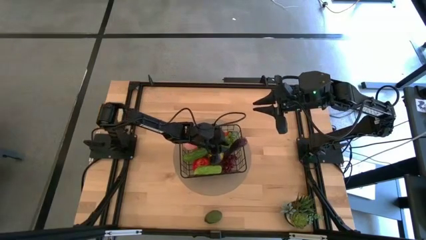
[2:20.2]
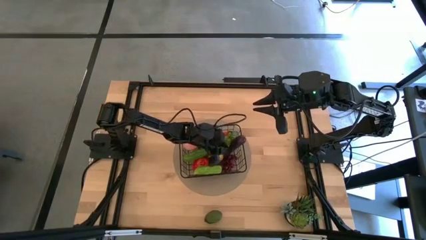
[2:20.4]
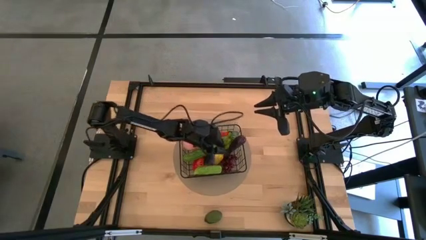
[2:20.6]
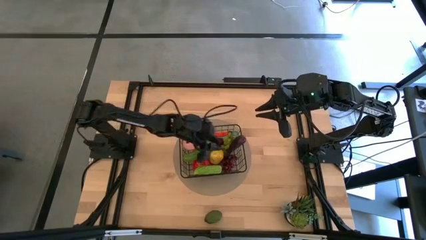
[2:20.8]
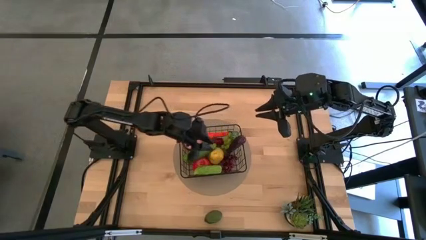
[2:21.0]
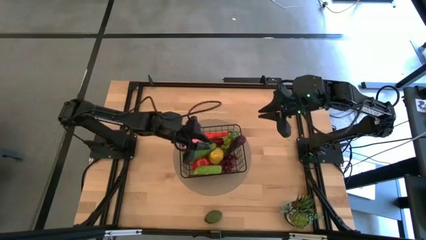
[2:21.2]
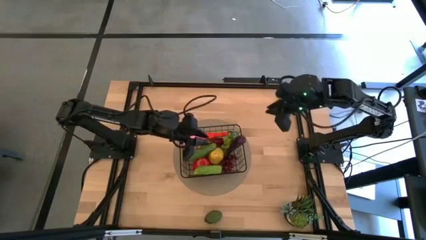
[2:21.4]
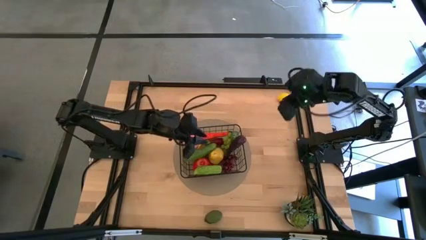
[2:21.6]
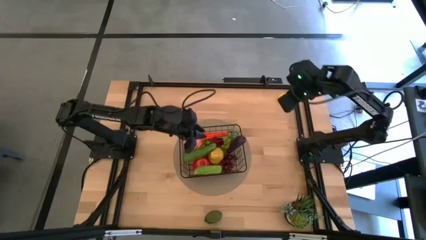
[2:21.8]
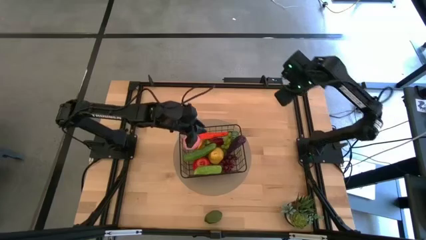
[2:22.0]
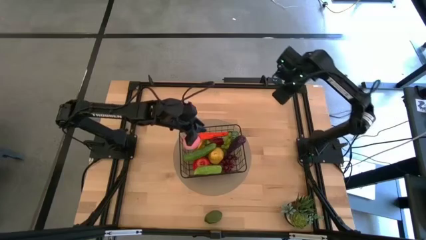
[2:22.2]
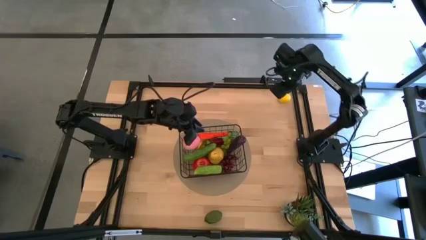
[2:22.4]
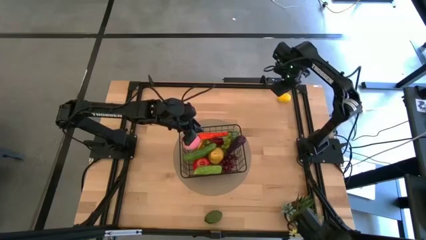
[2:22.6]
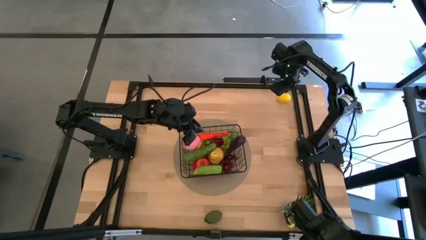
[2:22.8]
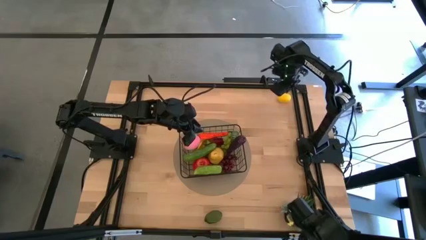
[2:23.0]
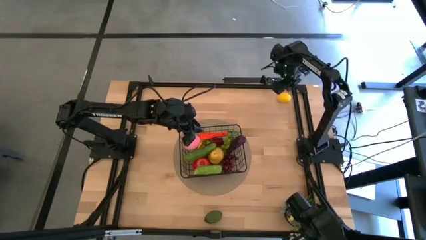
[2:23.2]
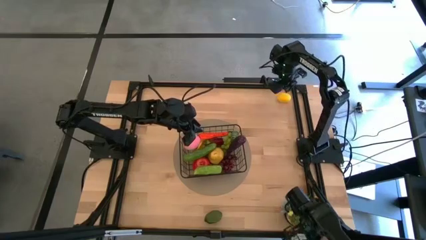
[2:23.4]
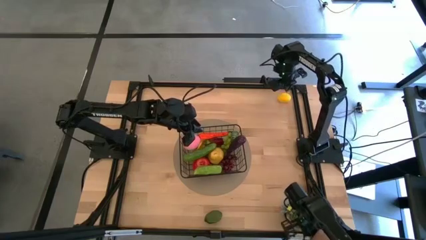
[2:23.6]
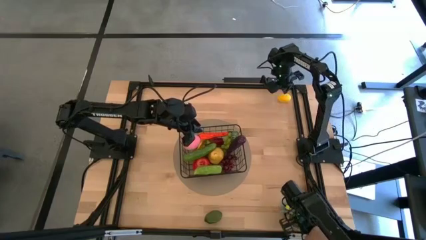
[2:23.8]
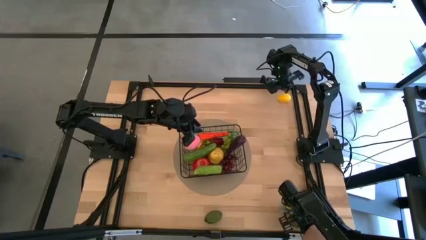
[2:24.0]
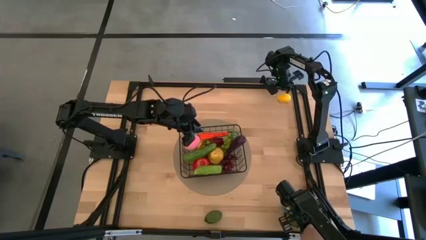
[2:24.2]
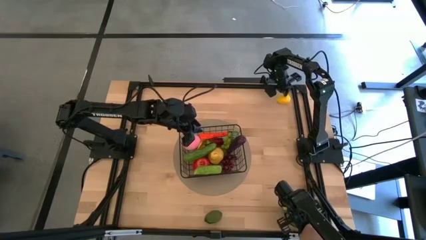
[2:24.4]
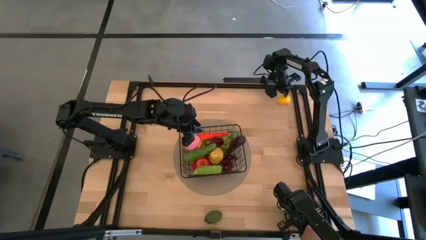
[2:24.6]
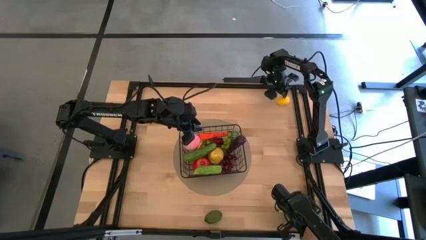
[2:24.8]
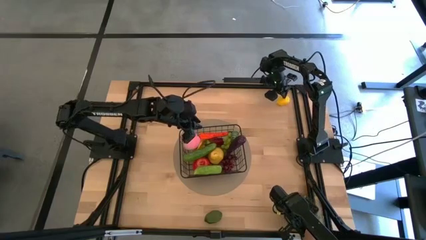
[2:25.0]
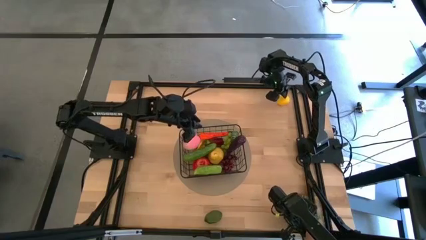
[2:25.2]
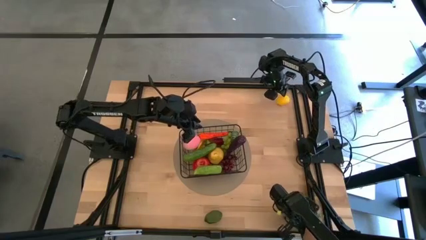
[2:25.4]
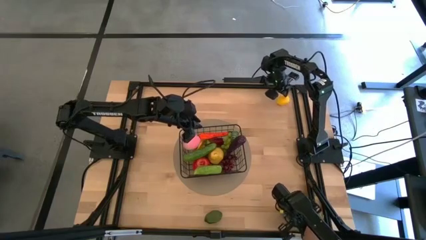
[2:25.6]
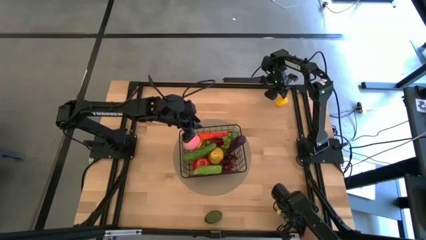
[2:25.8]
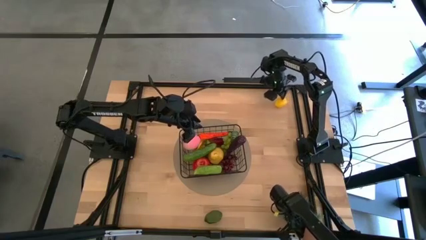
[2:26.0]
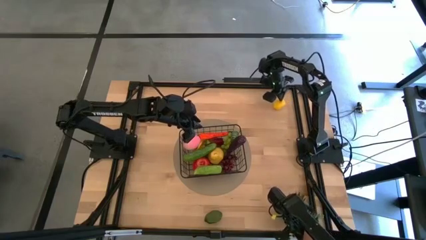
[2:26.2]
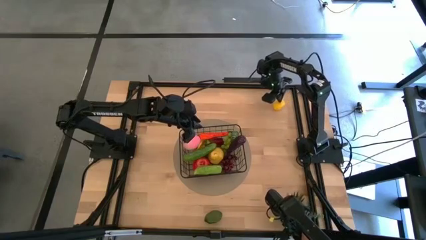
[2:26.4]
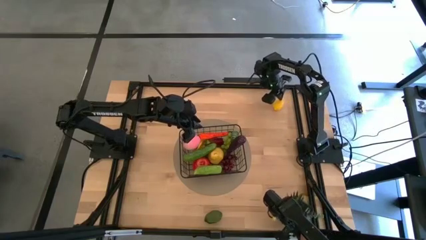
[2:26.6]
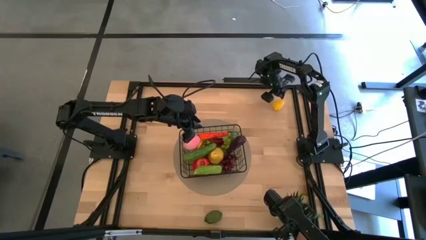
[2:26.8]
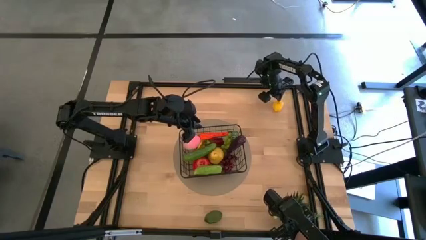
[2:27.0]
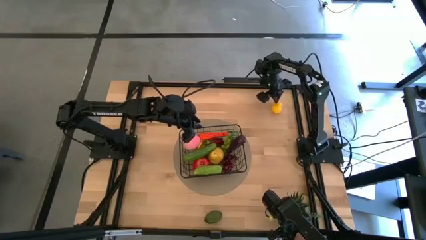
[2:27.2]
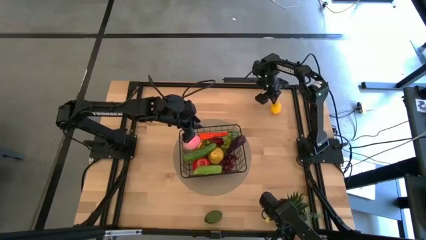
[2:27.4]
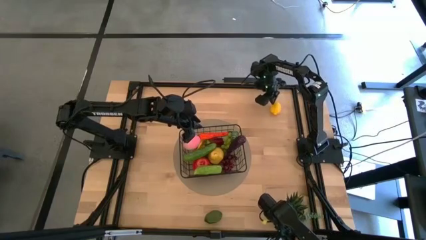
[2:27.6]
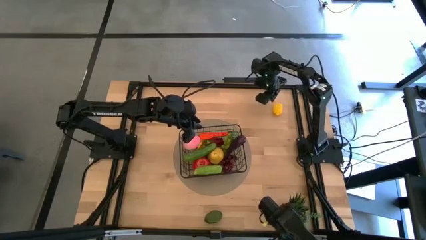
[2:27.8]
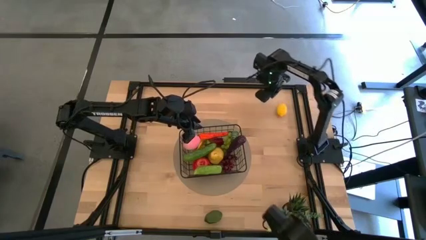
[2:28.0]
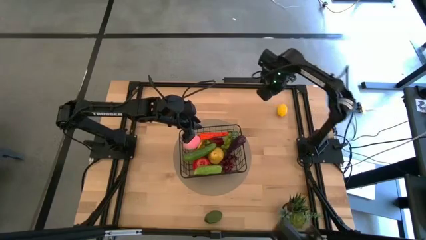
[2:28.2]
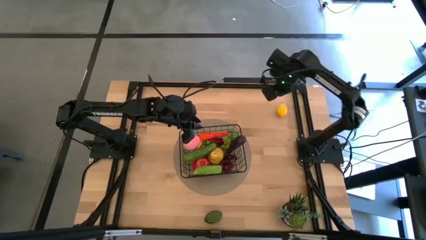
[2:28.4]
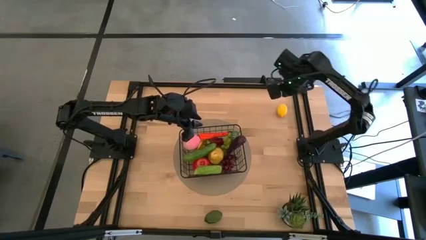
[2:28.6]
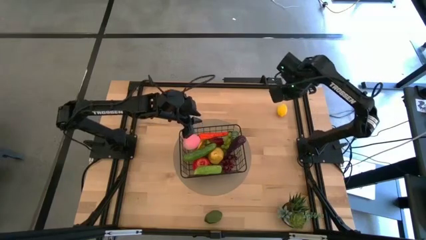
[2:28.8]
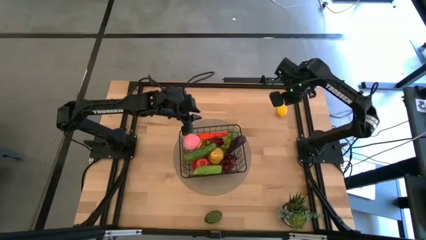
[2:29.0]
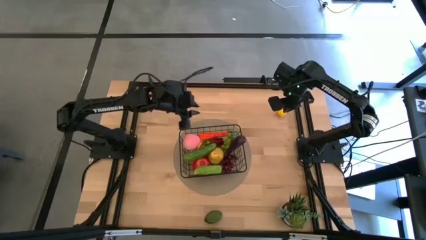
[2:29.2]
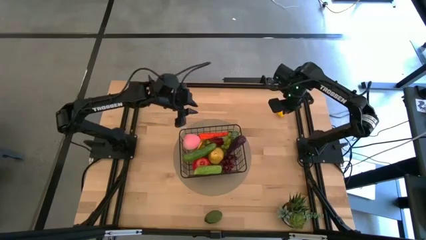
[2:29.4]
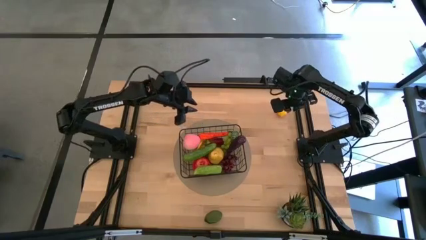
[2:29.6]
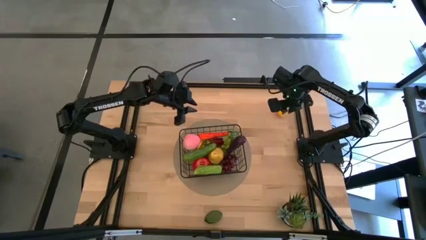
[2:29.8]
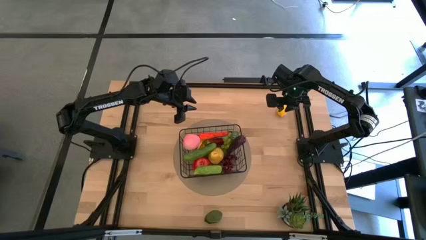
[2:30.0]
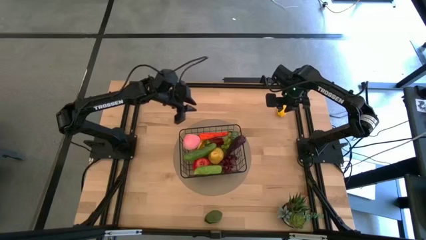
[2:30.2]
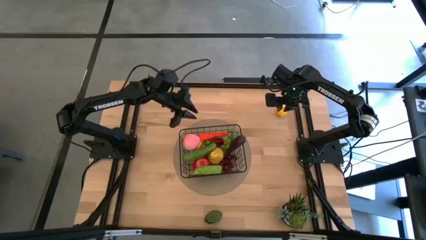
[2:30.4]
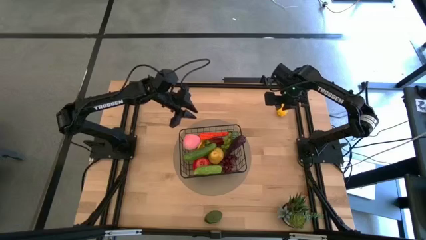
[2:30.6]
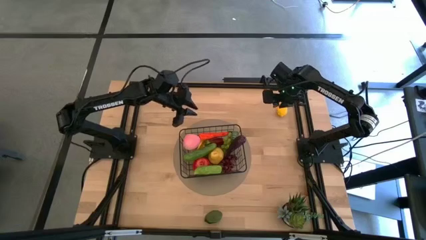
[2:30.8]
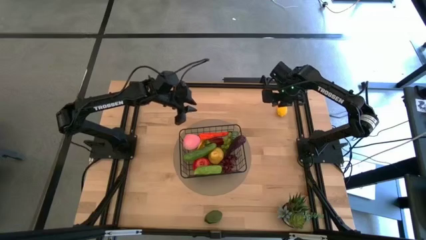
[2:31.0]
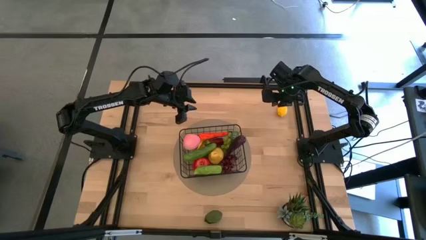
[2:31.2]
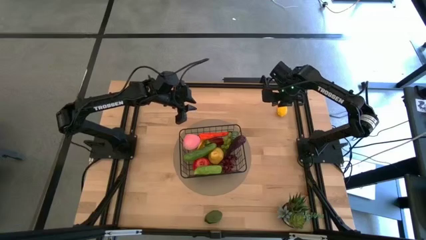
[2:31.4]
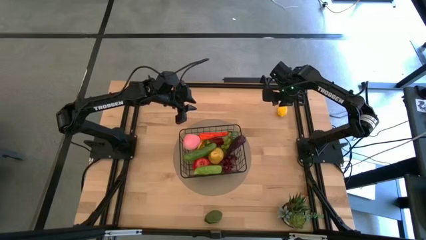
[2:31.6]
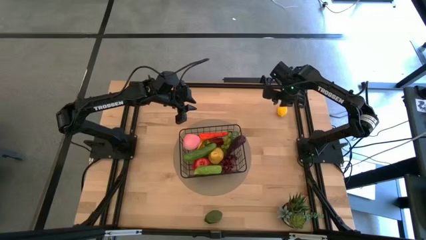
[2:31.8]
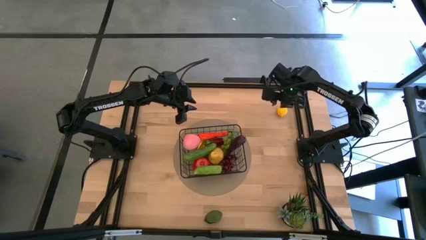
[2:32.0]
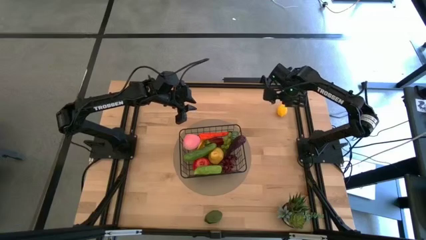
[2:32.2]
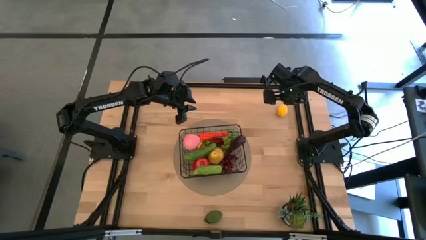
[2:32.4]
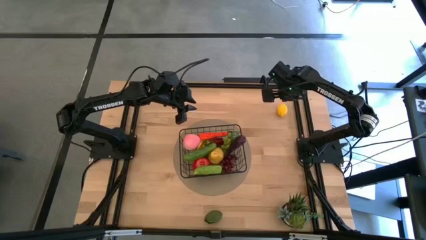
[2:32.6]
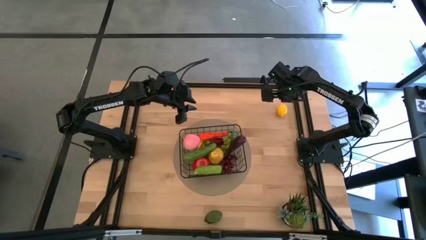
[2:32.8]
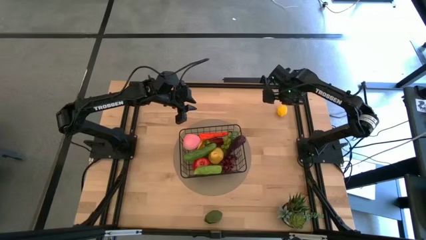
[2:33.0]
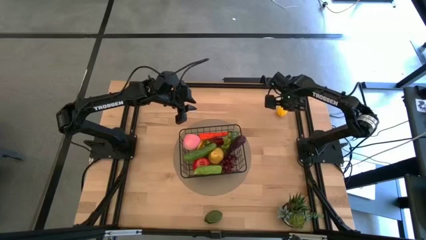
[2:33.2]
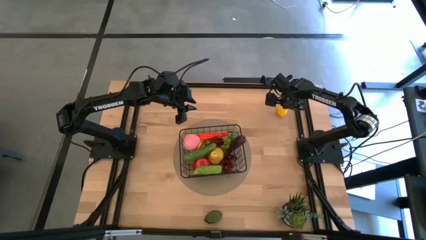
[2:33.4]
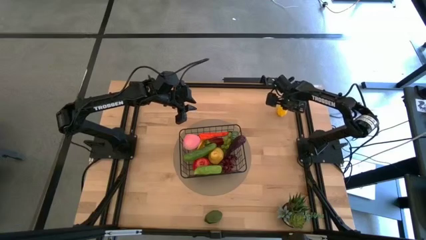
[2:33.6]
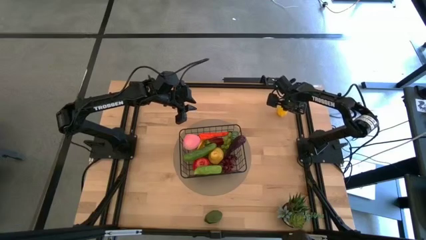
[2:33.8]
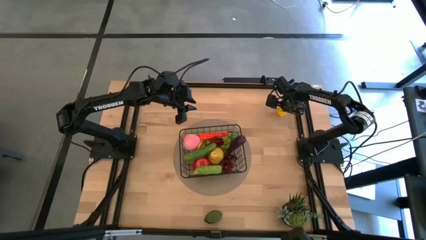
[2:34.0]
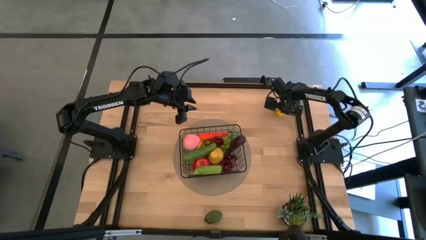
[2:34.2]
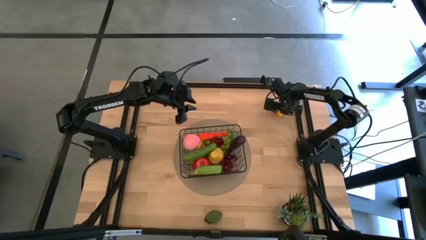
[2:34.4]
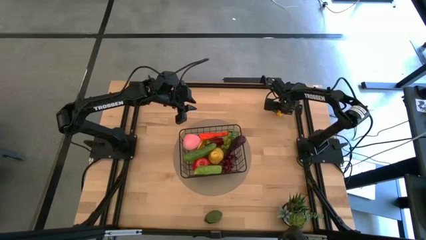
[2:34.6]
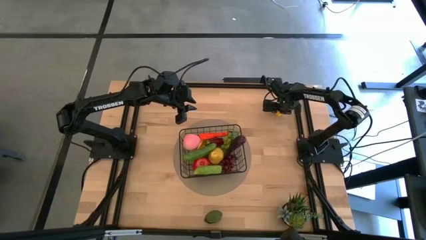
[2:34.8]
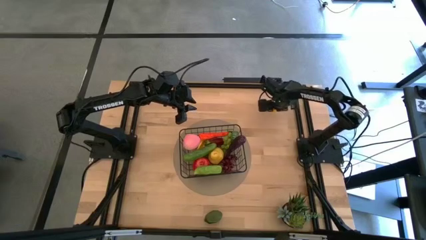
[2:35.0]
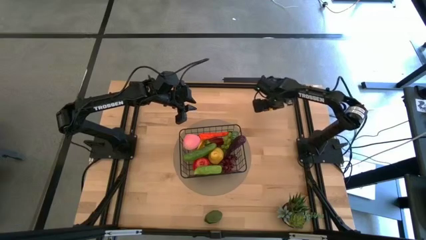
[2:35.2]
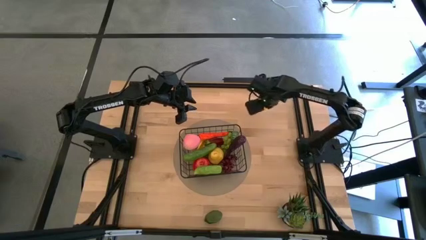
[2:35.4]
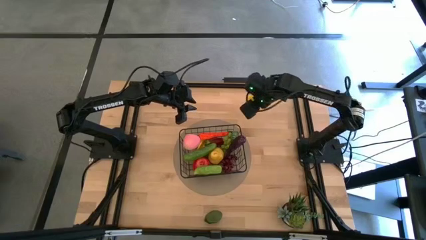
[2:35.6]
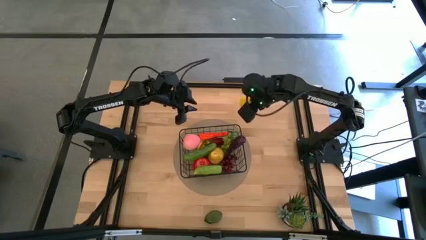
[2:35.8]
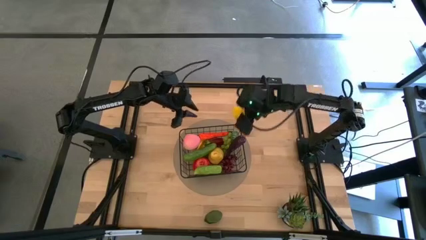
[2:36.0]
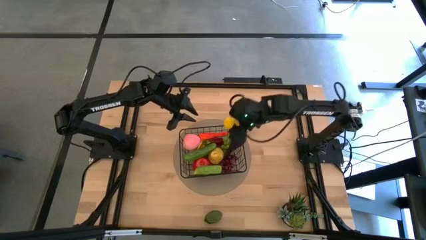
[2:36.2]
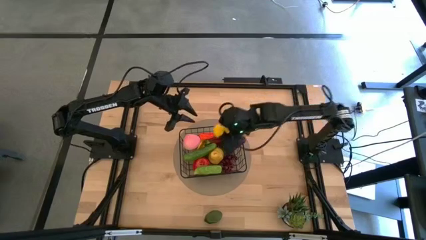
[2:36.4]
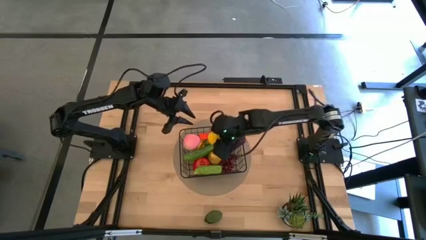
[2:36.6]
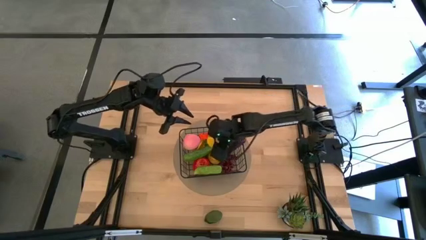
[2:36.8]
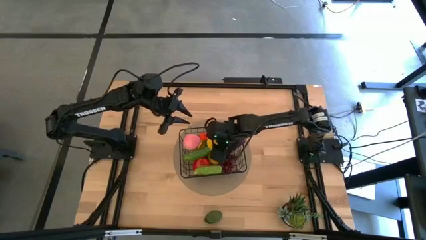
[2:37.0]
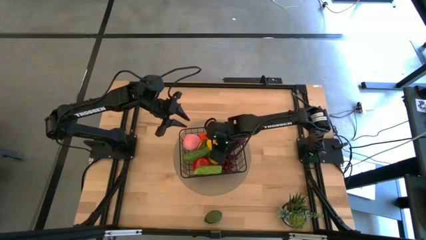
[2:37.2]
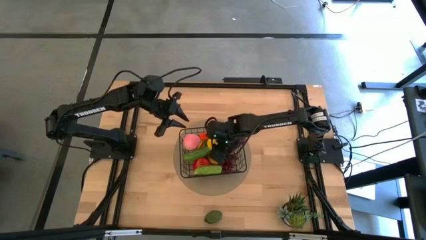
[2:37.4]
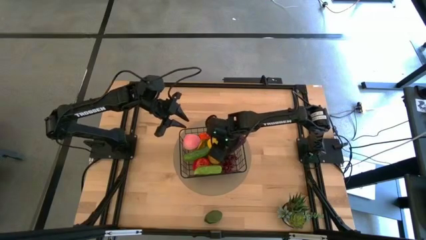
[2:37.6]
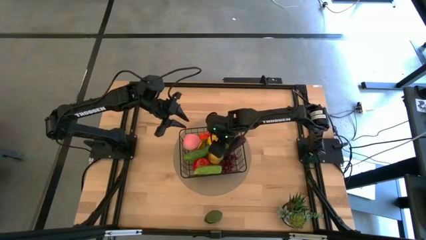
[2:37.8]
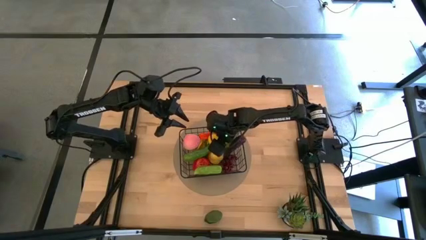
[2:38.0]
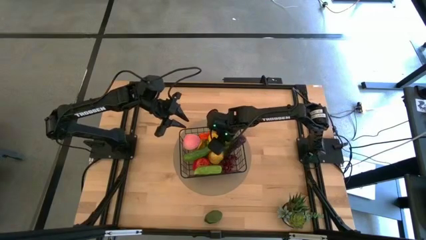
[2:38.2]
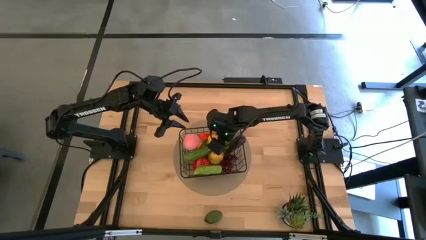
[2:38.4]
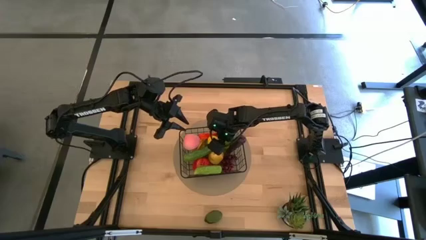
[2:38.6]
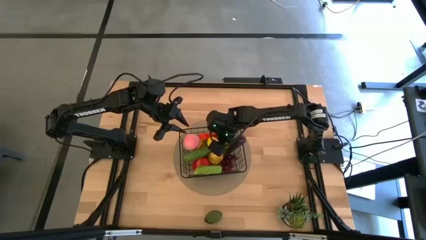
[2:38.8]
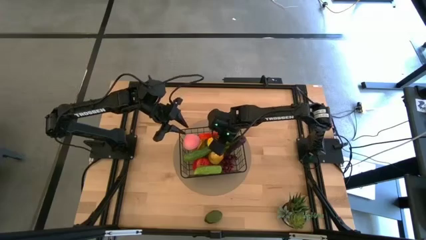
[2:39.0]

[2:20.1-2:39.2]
Task: Build produce basket
Put the yellow lemon into the black wire basket
